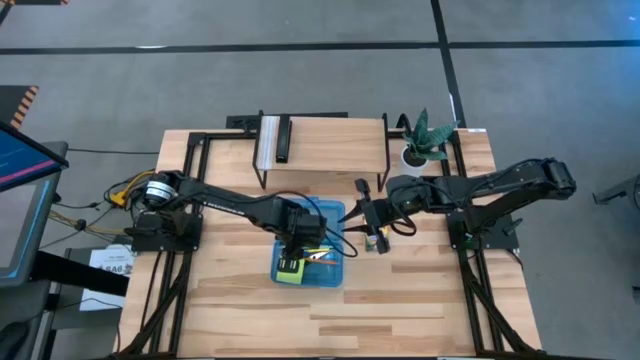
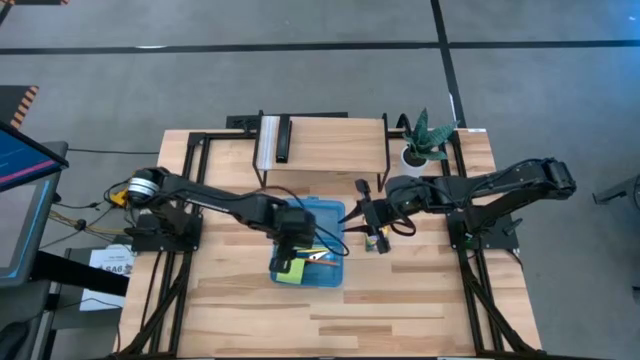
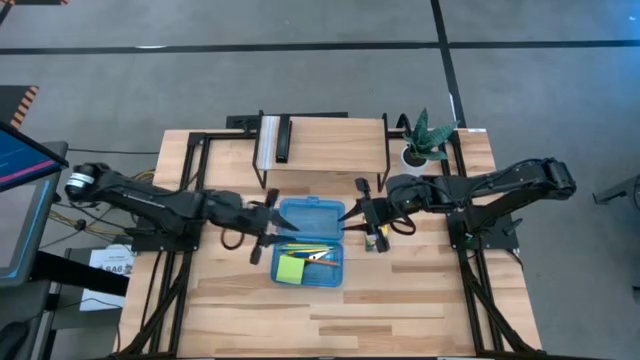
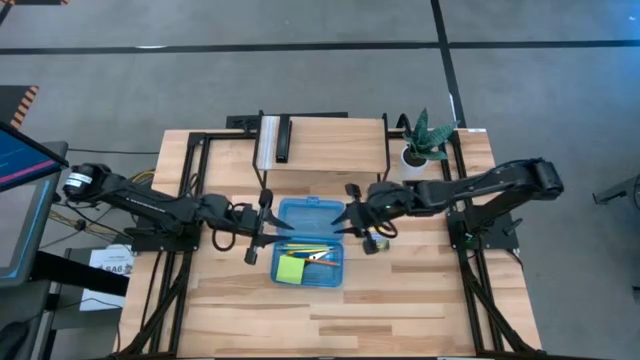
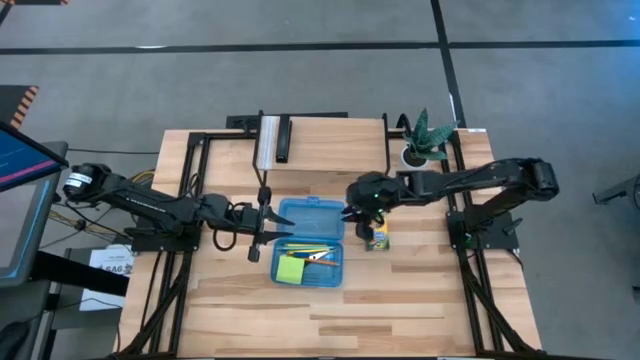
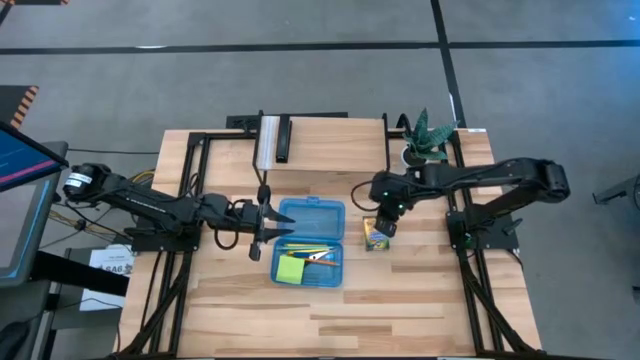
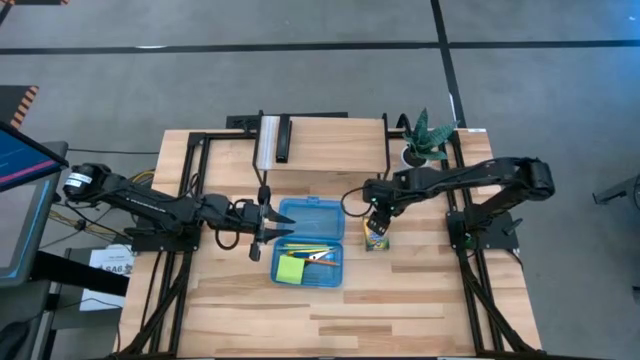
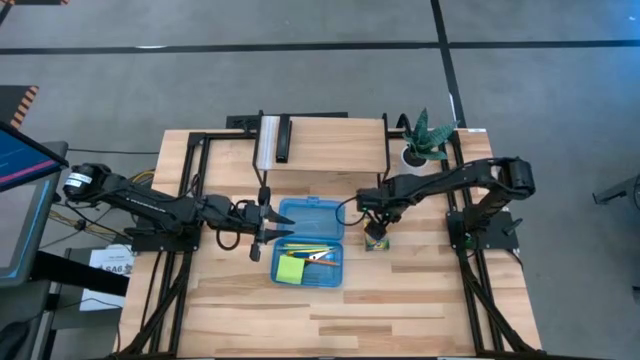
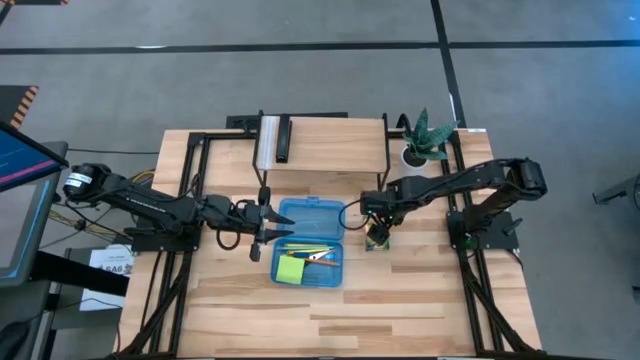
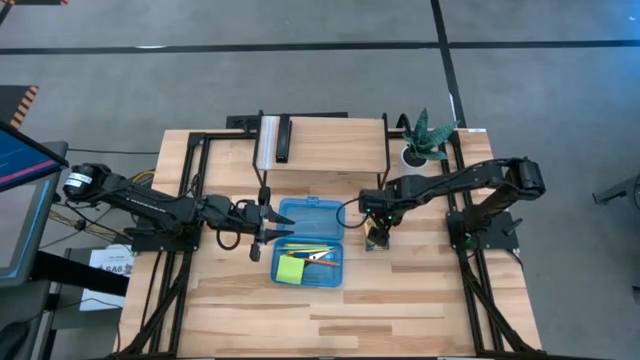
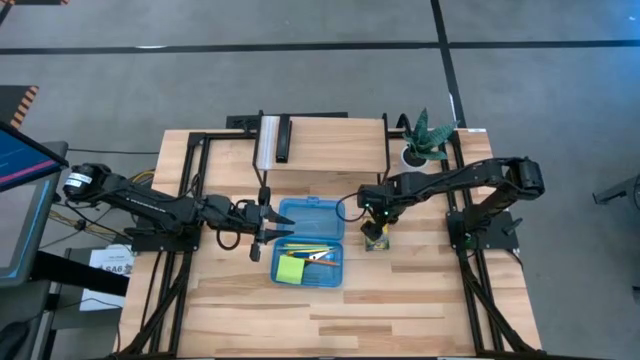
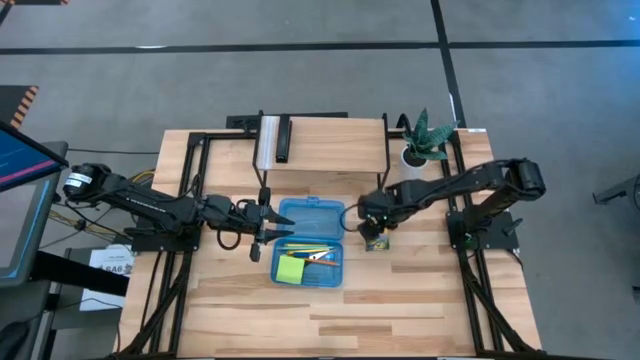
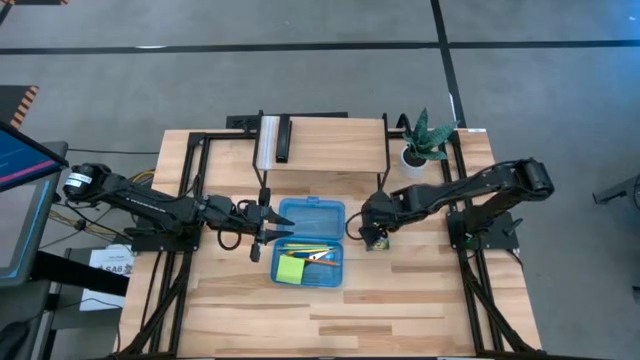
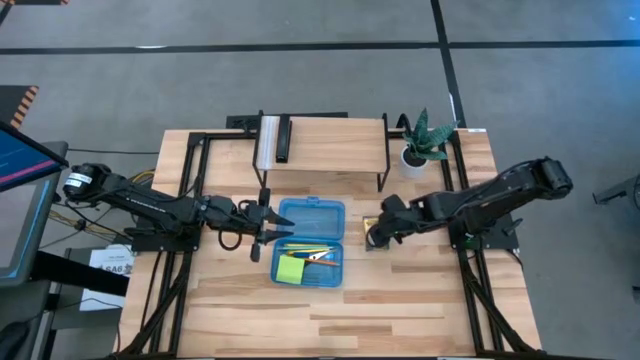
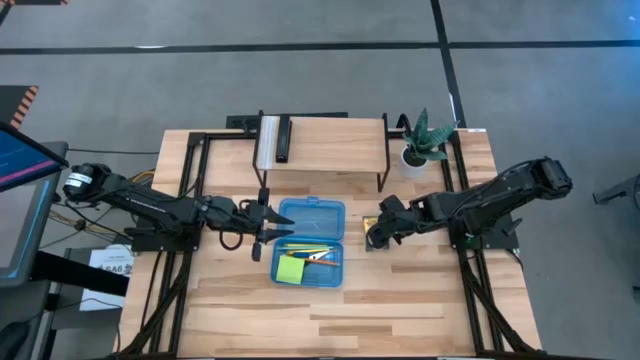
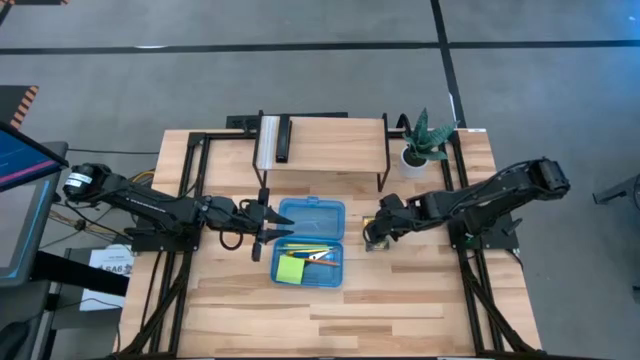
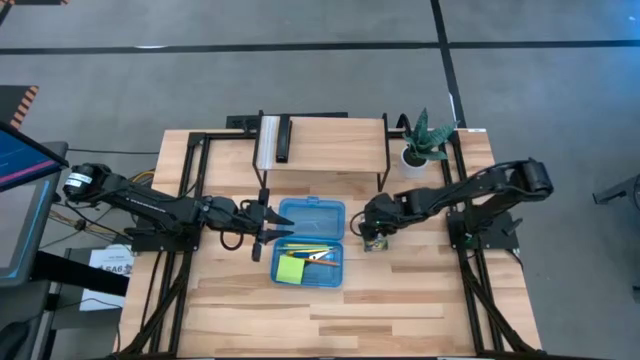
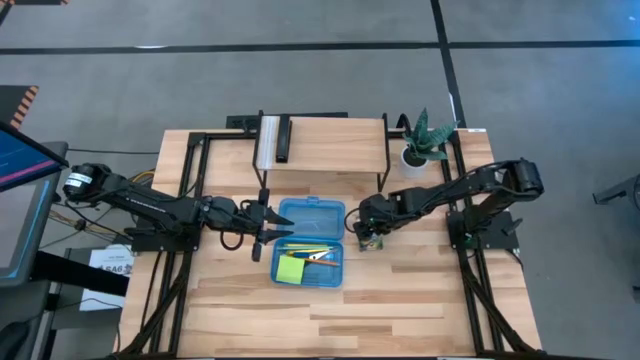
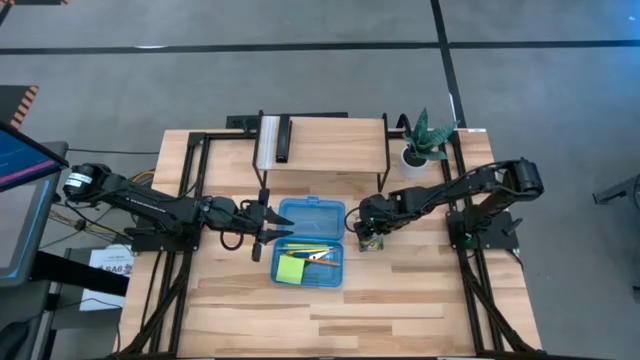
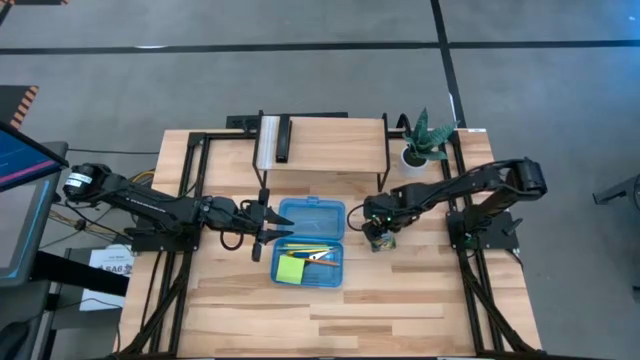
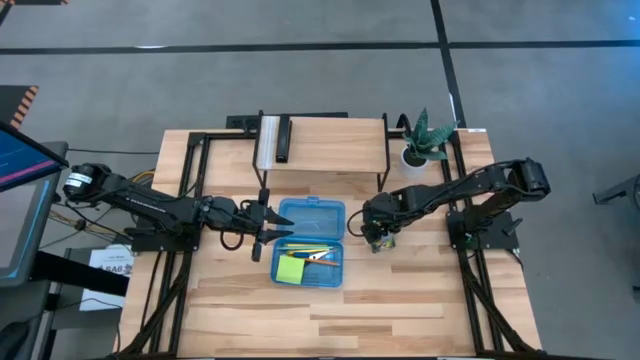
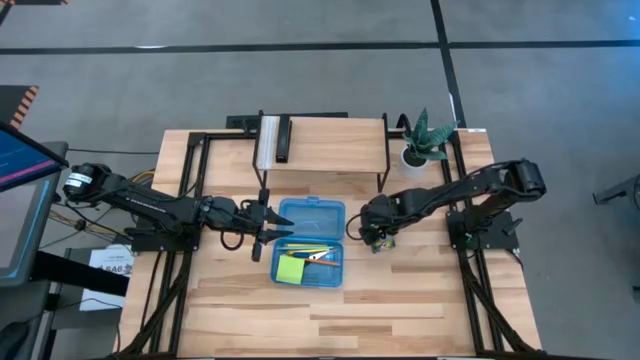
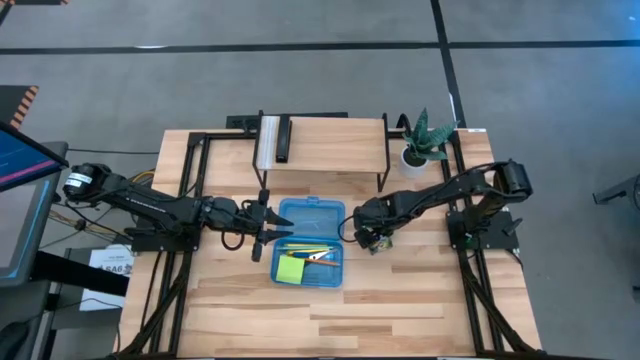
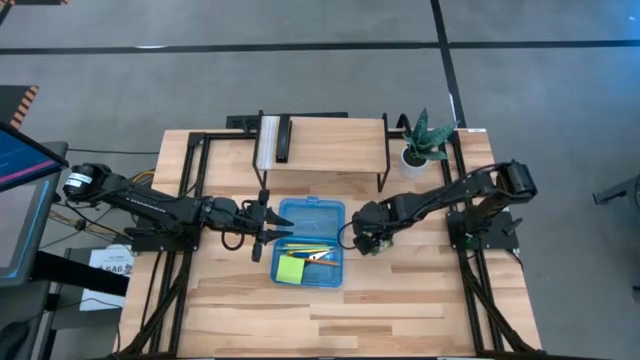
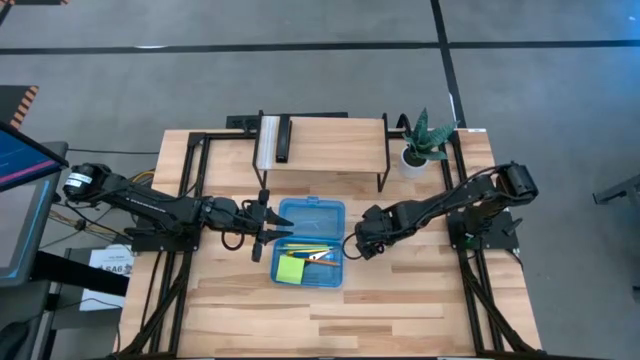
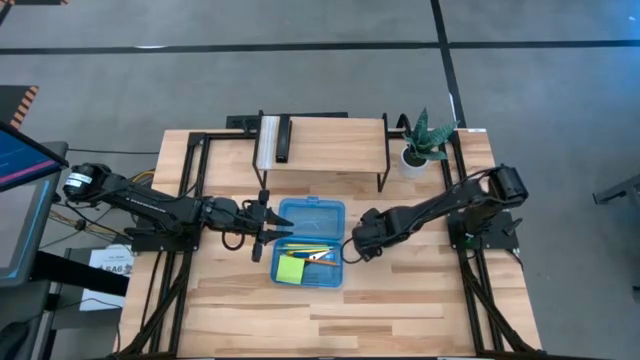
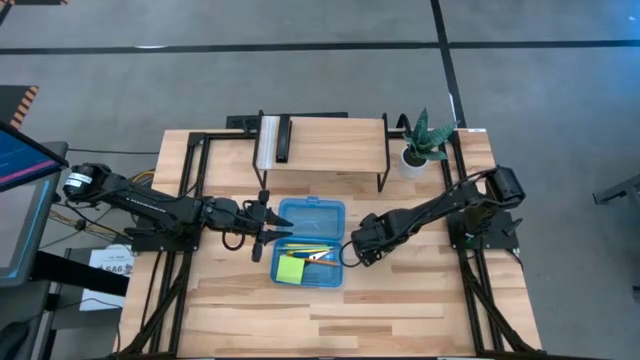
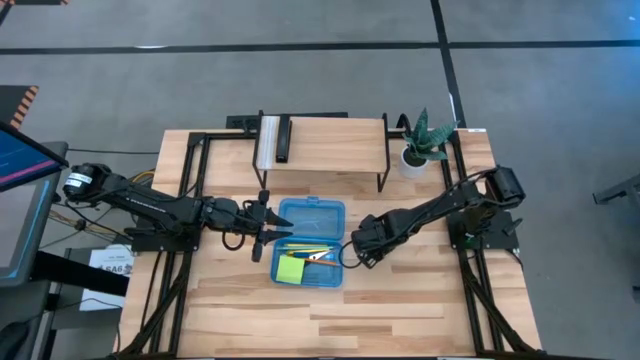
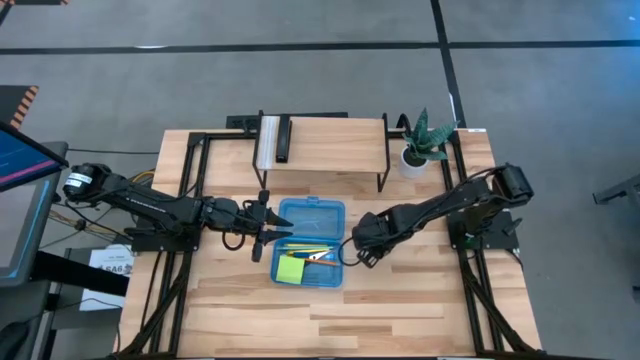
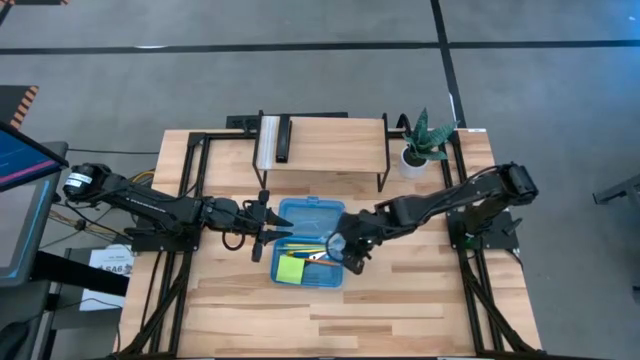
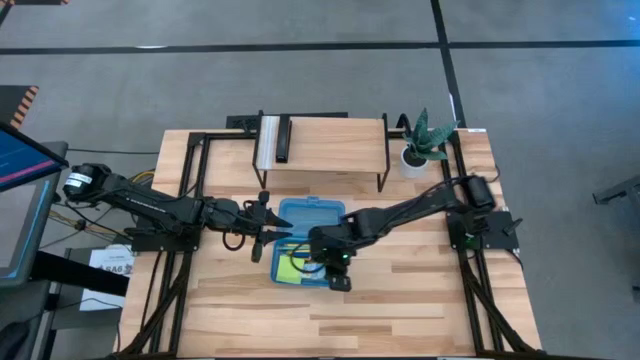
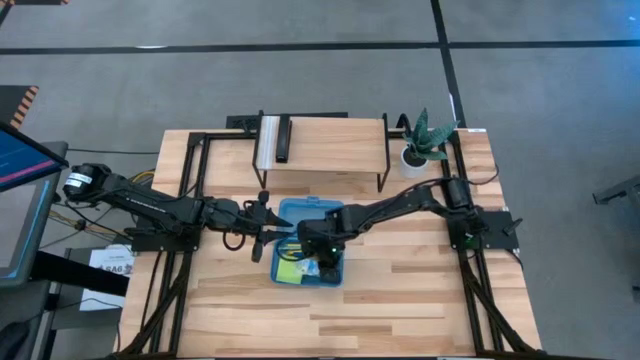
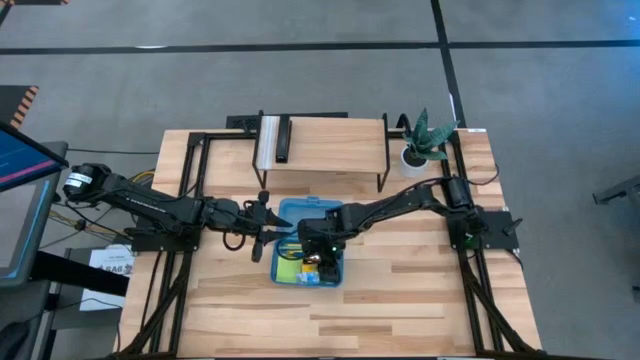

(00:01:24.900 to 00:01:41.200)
Task: Pack school essentials
Put the yellow crayon box into the blue supply box

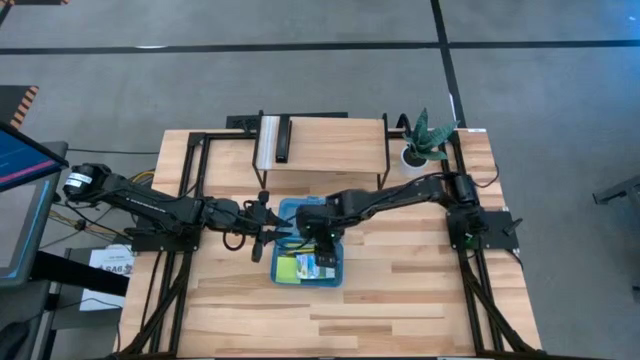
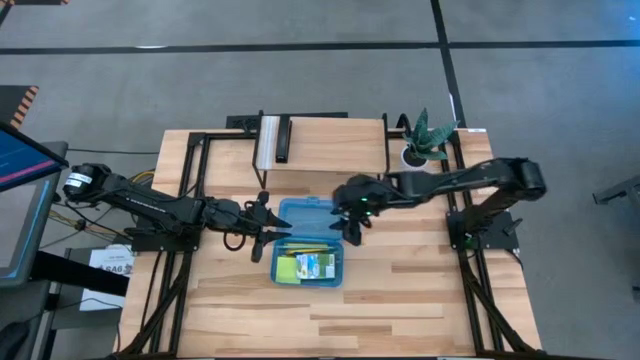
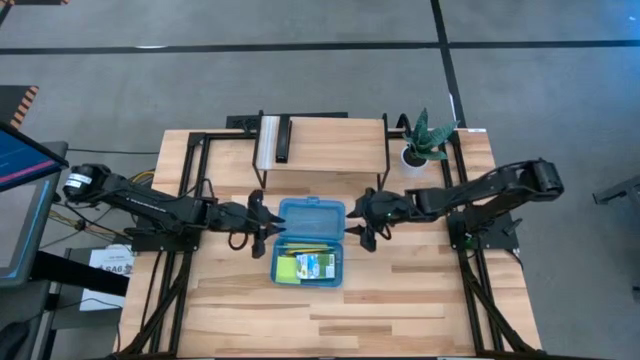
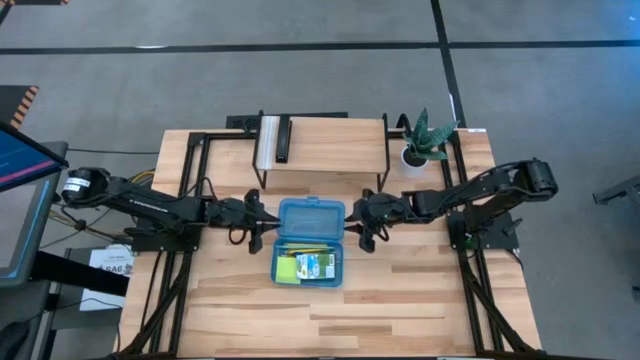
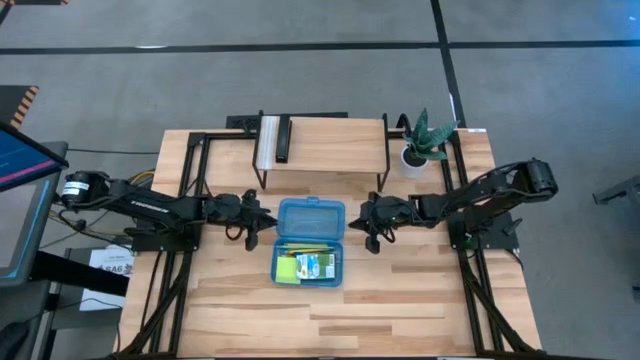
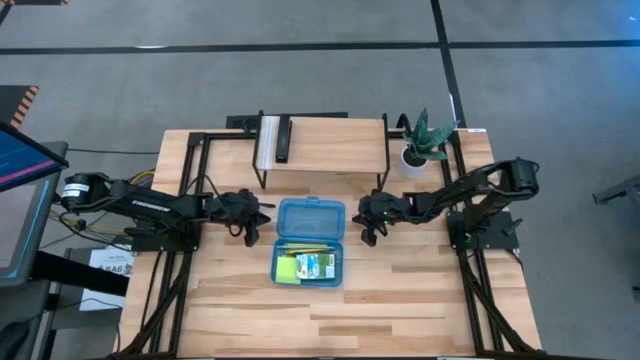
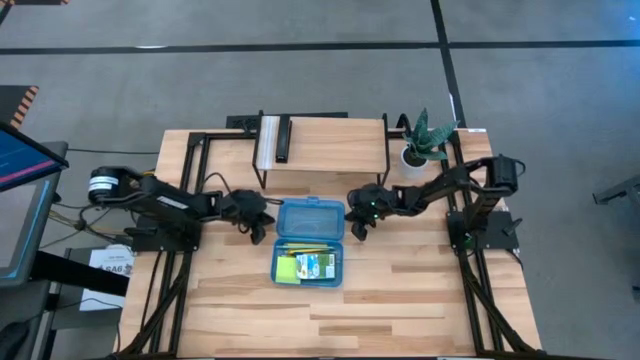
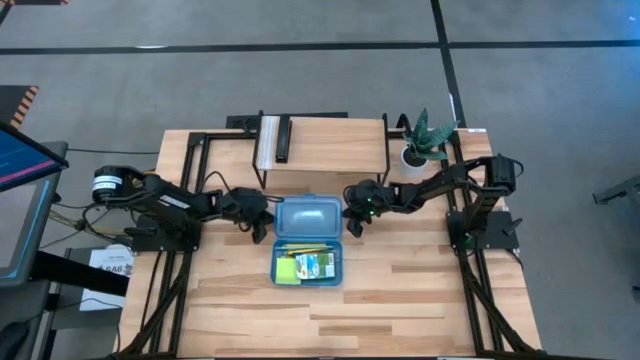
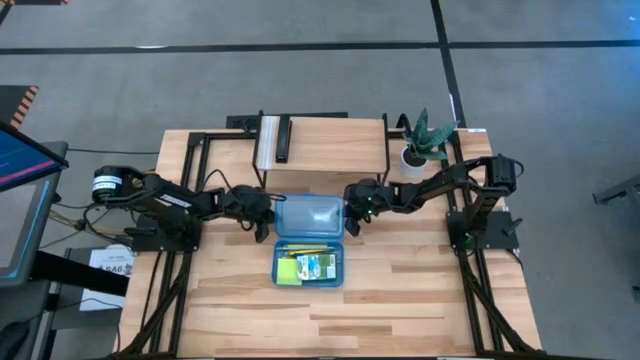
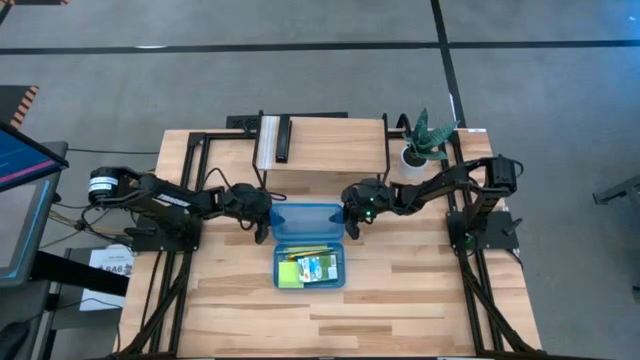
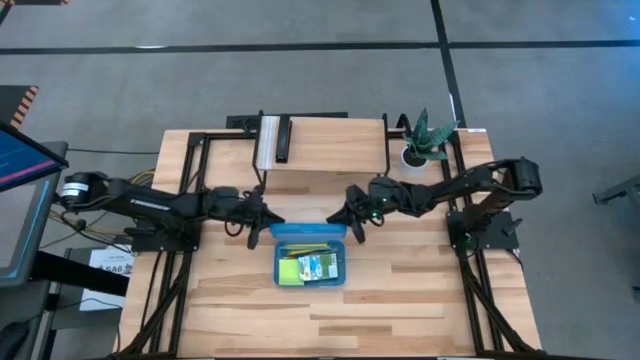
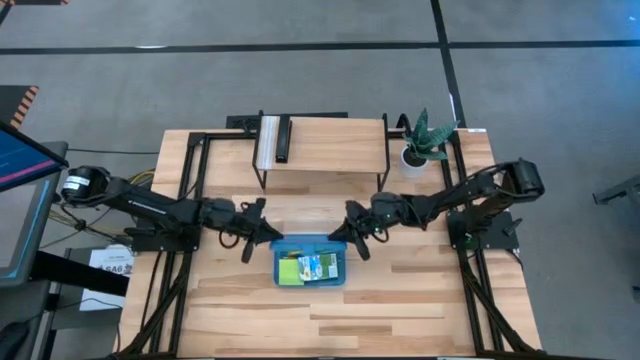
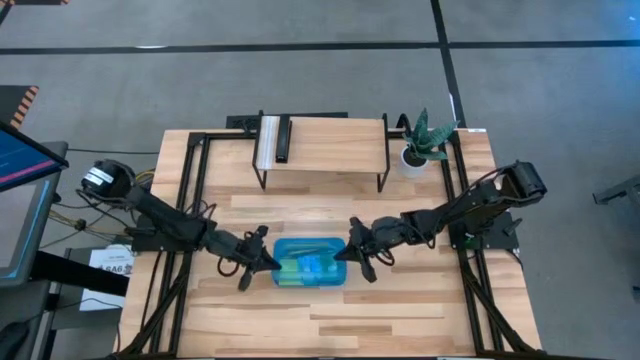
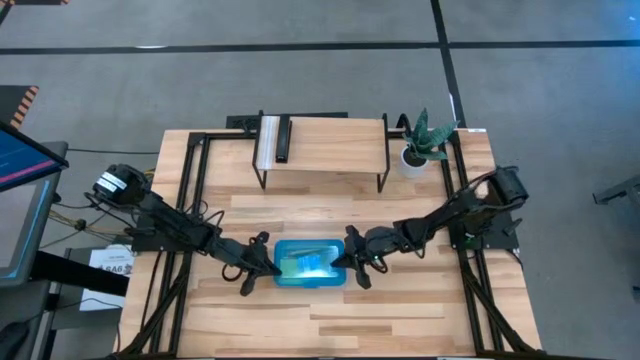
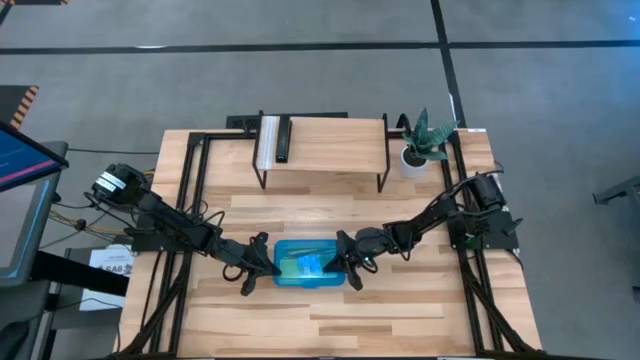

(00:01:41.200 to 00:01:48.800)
Close the blue supply box
